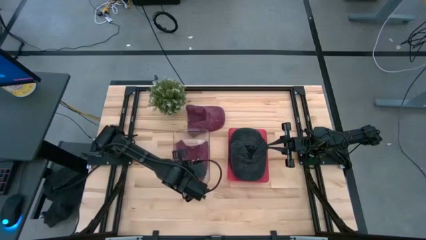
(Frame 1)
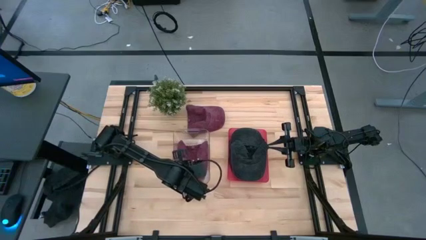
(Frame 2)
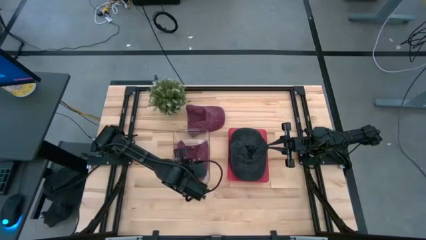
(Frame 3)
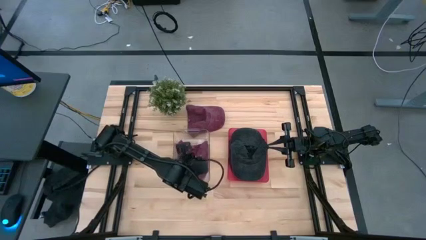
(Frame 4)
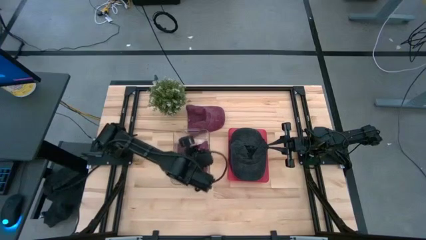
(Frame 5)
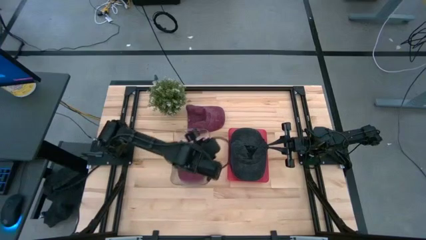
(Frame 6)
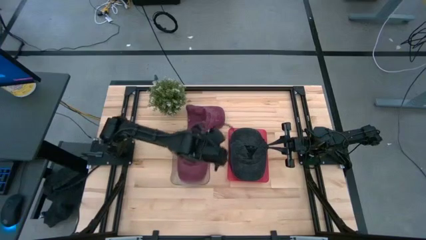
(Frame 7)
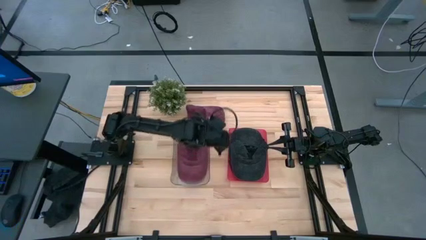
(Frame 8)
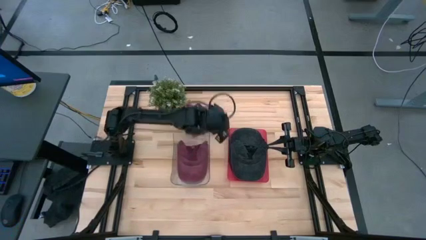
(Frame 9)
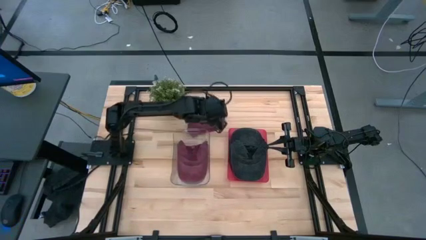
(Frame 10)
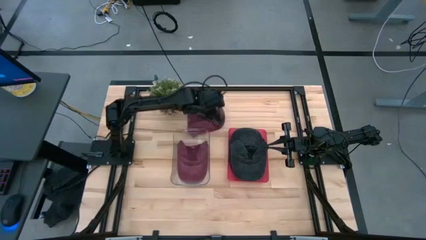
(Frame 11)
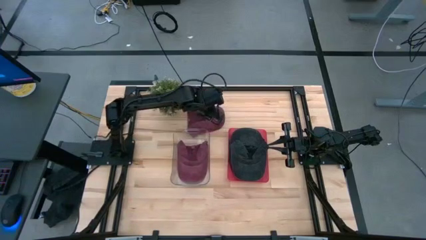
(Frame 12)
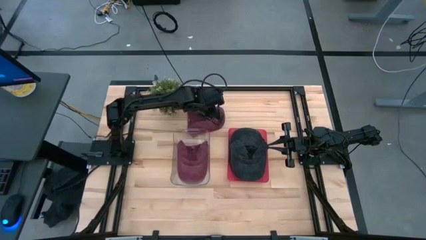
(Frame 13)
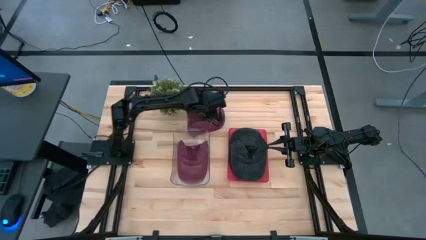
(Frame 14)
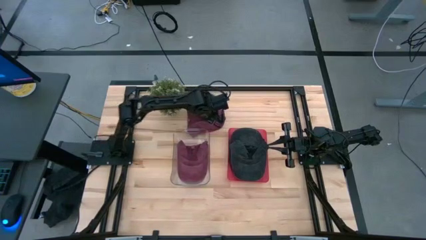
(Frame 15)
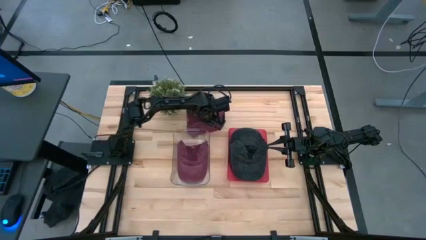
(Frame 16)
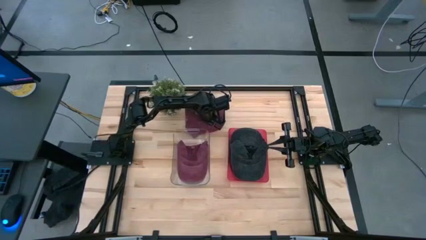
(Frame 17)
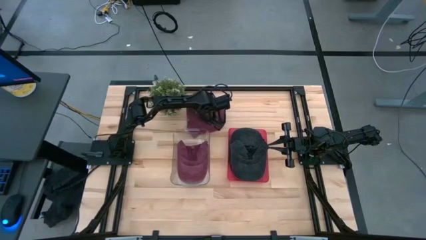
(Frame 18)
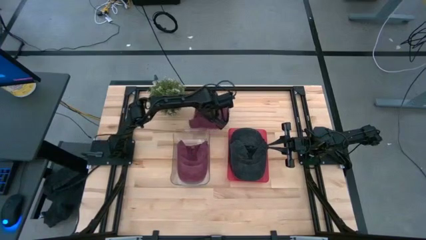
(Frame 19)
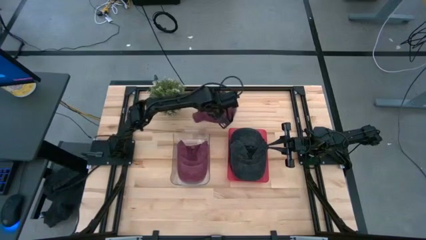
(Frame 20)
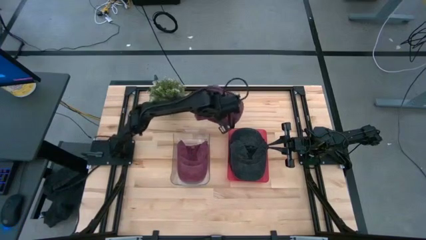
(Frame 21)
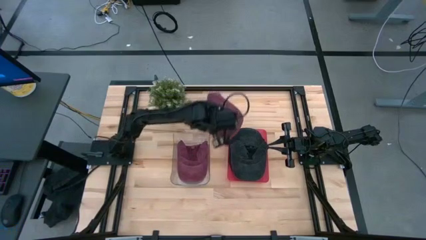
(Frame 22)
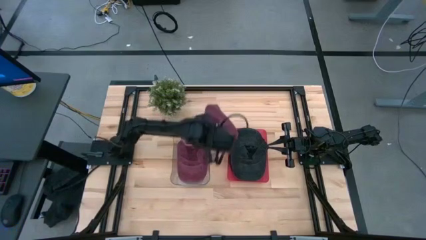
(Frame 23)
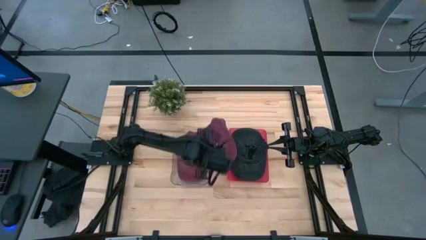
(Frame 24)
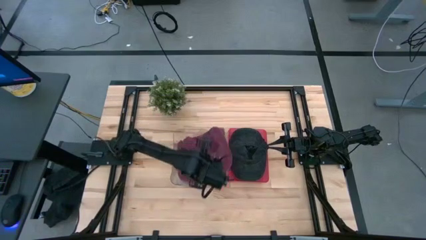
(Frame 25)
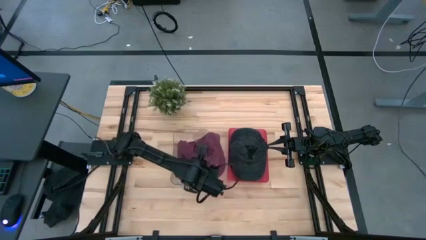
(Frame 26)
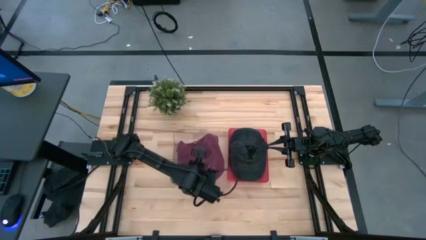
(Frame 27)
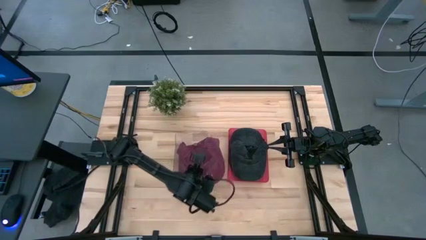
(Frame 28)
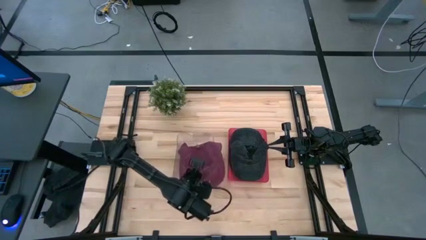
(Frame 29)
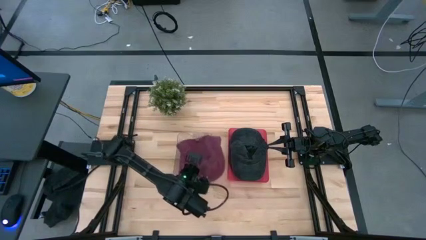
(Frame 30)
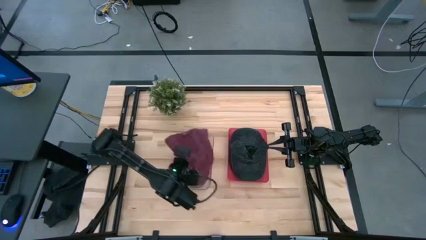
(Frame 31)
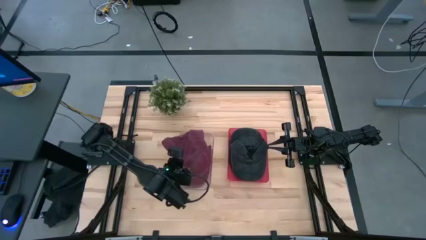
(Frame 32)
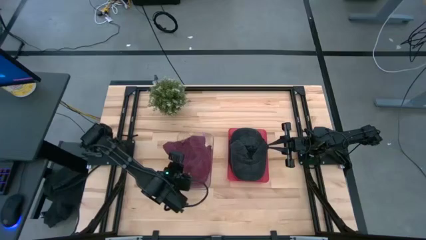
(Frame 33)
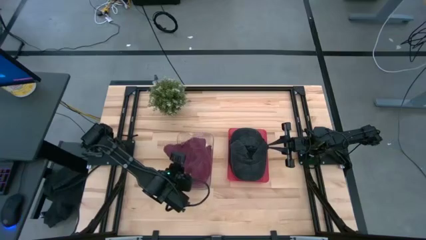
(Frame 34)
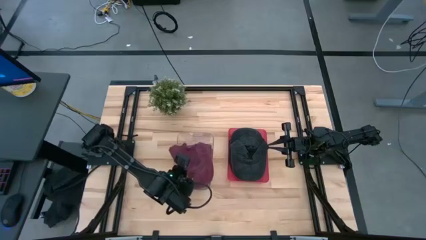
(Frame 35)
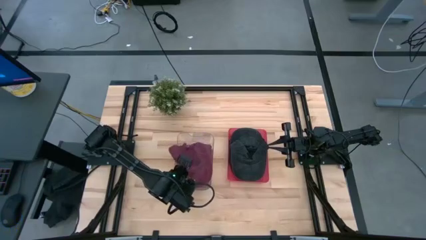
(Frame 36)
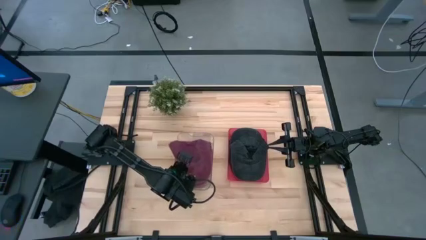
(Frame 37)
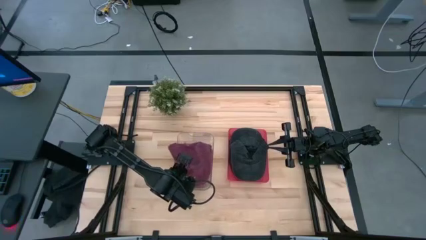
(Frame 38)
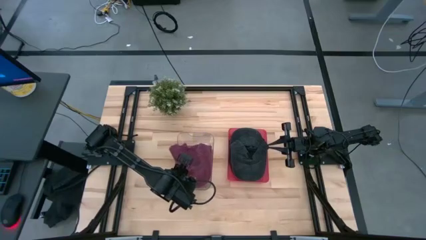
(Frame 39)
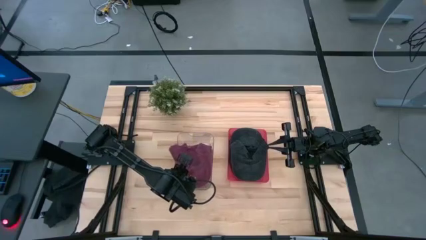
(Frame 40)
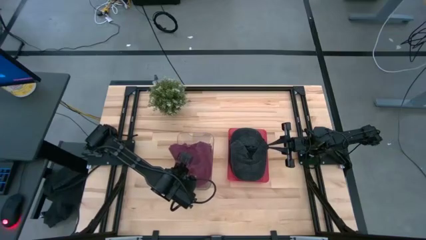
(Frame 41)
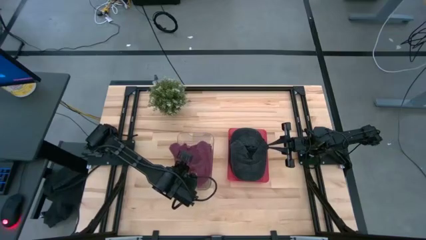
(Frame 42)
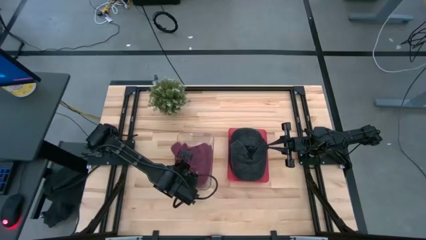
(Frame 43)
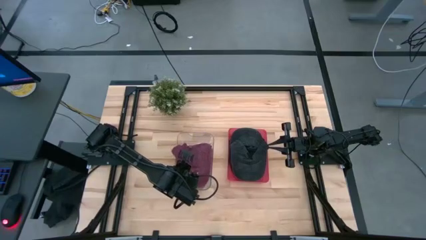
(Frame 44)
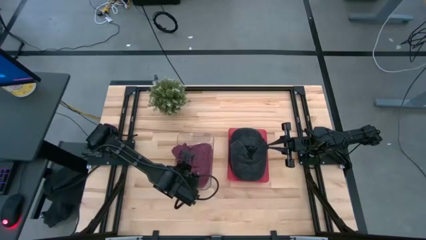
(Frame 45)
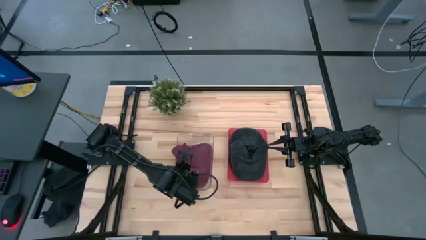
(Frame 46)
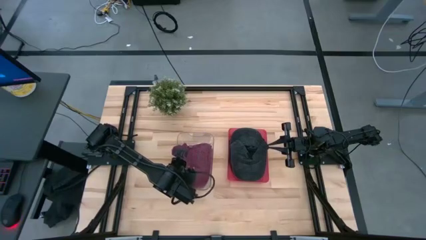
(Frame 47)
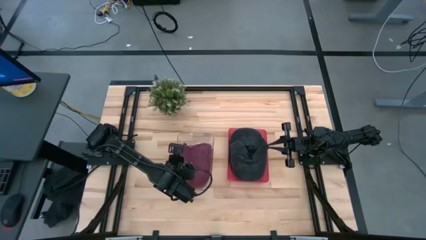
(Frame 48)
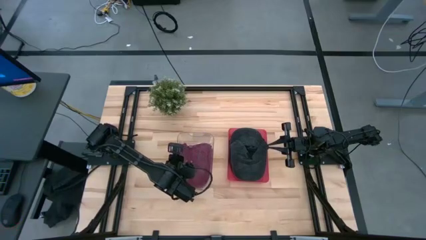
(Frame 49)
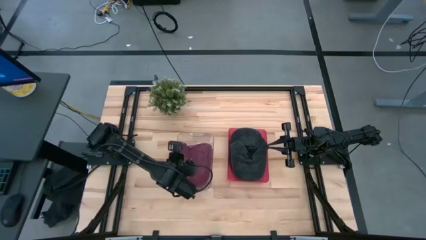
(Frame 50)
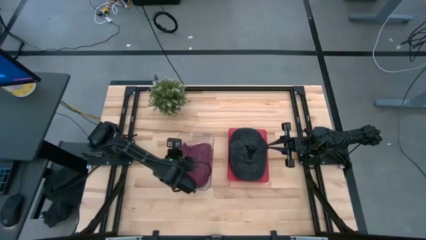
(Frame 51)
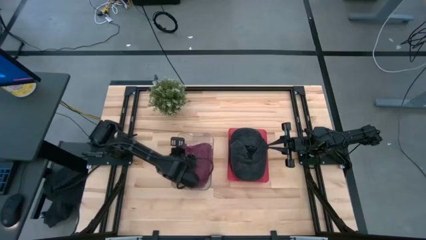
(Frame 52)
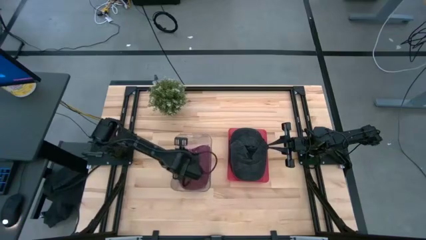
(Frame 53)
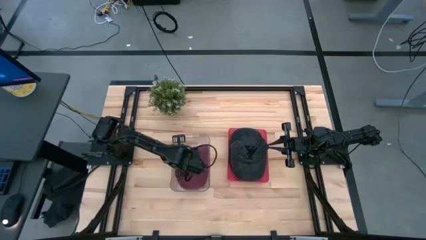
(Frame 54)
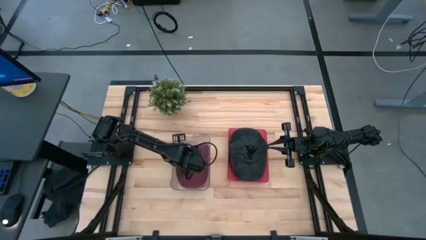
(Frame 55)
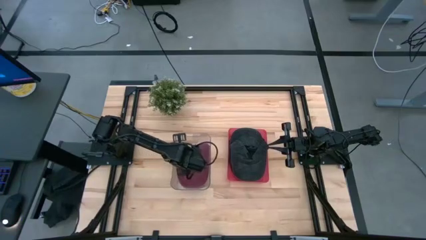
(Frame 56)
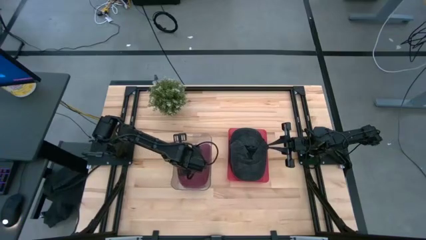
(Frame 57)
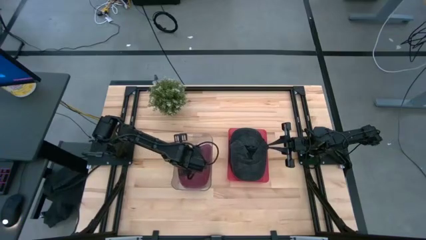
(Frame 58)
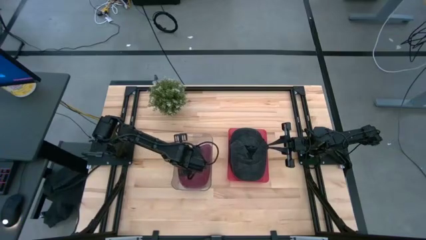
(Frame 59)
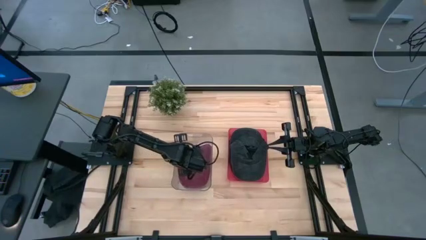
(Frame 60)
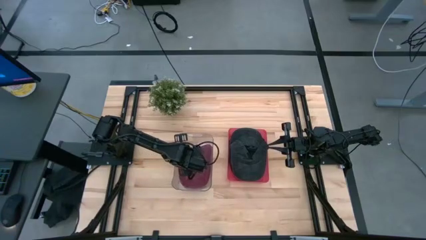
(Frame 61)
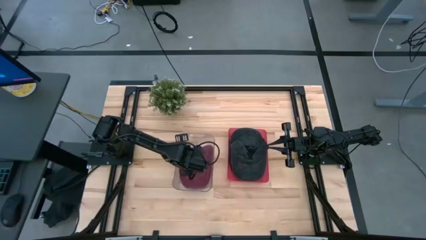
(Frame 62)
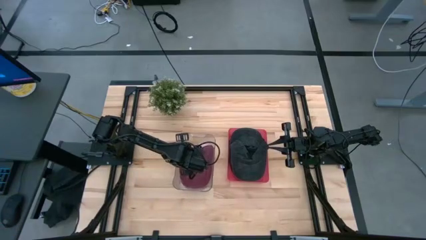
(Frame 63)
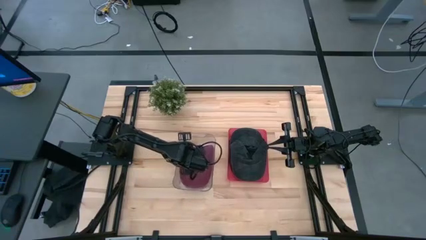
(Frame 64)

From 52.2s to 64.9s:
Task: Pick & Place hat
Put the red cap into the transparent bin

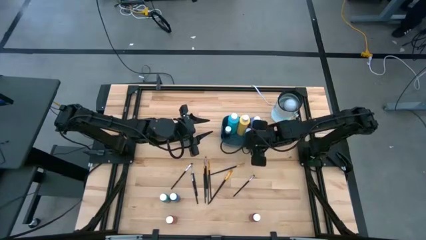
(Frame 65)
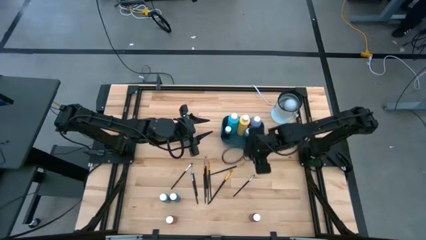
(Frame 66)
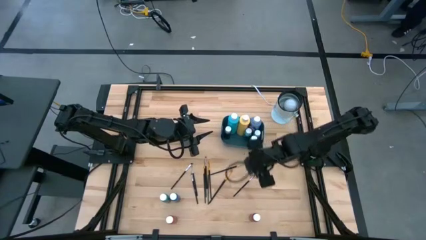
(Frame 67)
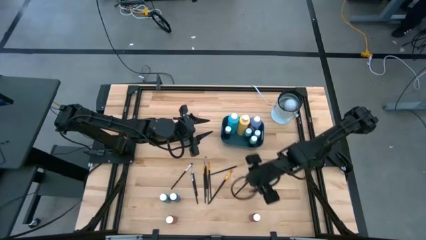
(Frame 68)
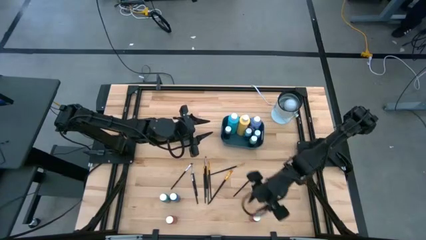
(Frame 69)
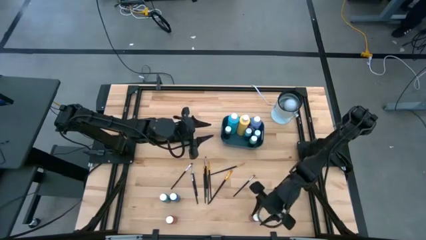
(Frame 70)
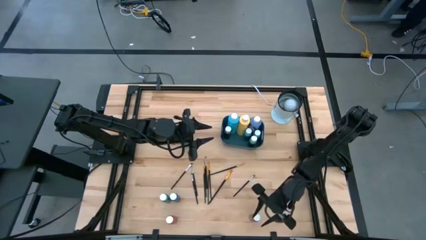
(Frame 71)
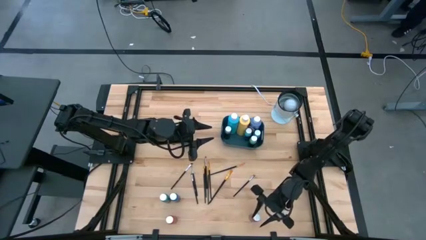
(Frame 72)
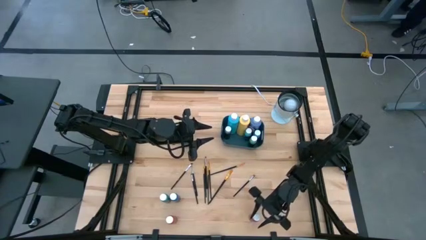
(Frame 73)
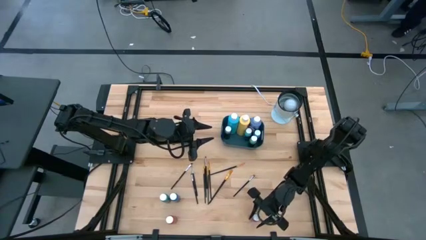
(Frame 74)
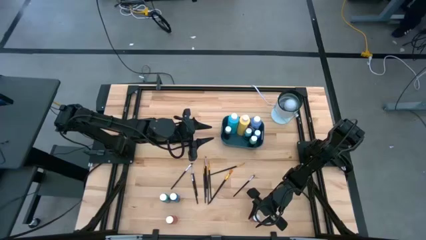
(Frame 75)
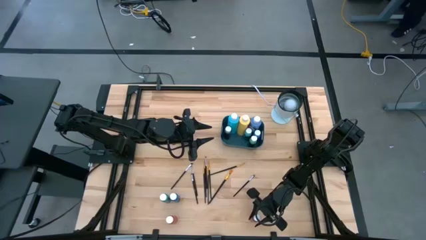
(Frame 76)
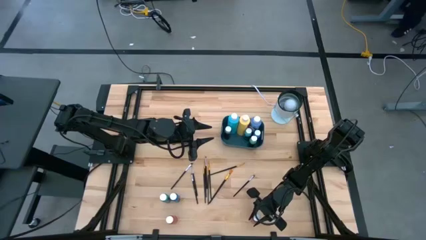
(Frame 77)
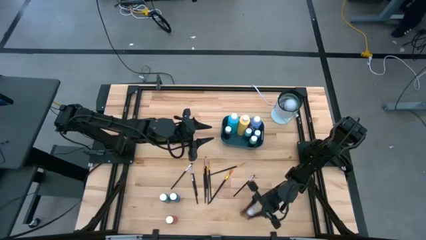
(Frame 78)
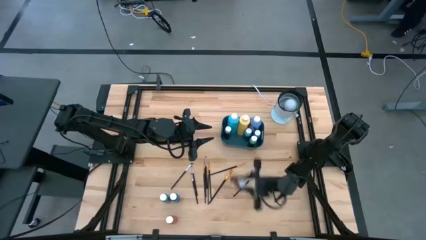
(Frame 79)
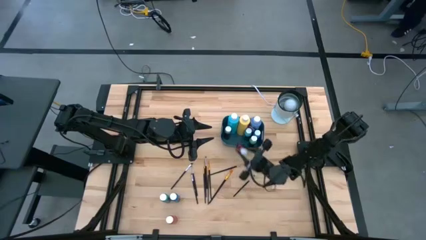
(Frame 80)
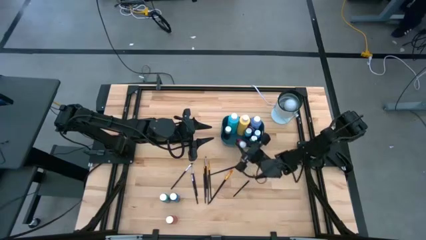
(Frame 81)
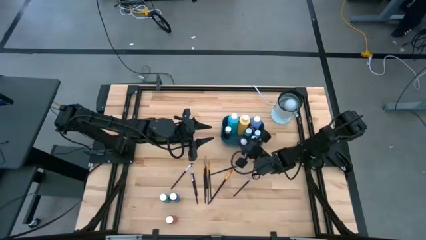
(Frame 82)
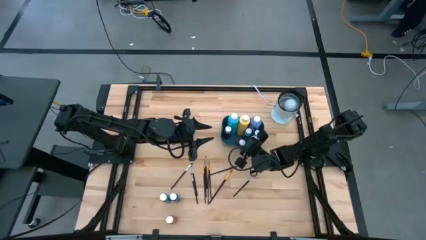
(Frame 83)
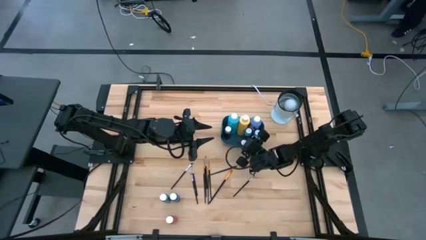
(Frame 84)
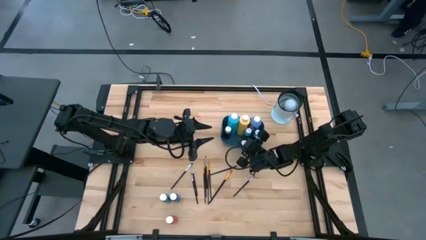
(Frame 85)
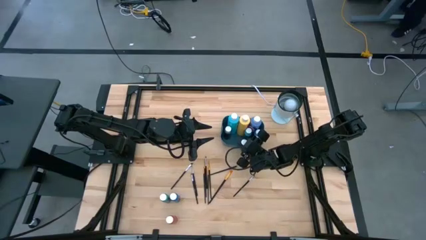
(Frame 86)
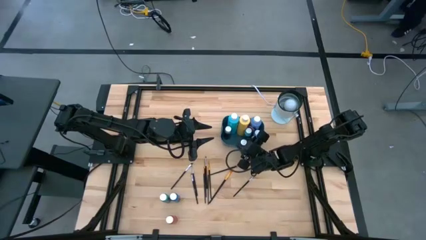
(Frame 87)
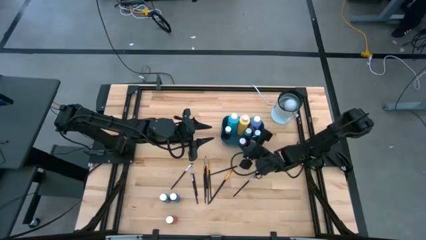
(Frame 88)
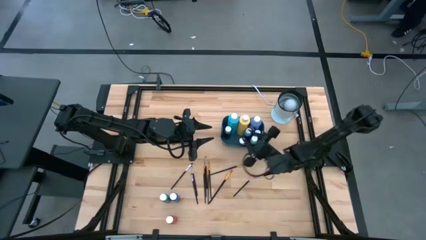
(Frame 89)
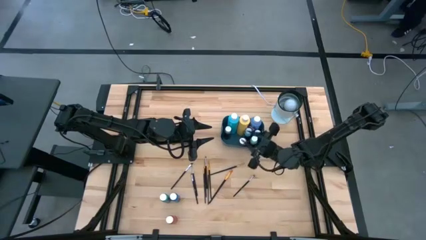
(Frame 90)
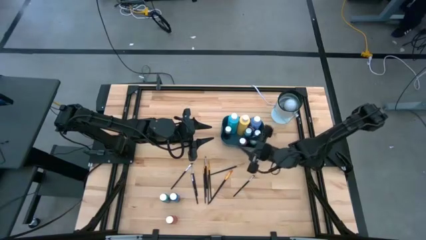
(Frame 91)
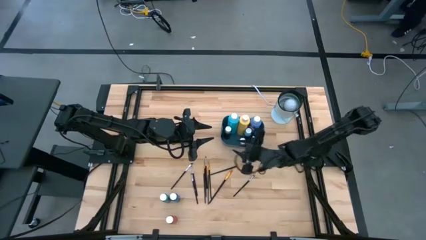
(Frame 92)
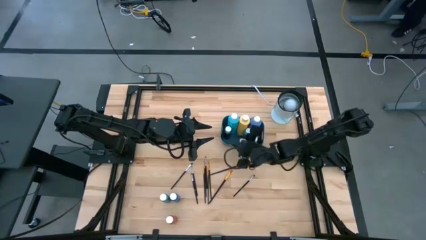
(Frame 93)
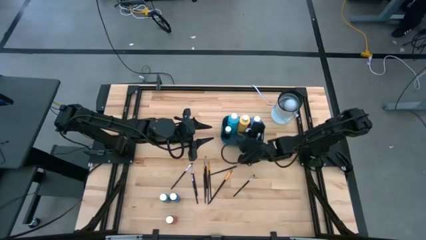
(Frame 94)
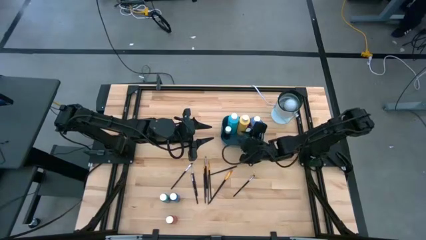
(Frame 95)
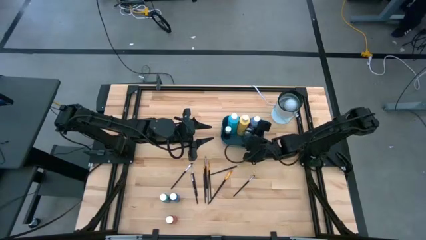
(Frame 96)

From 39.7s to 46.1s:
Task: Pick & Place Paint Supplies
Put the small red paint bottle into the blue bin
